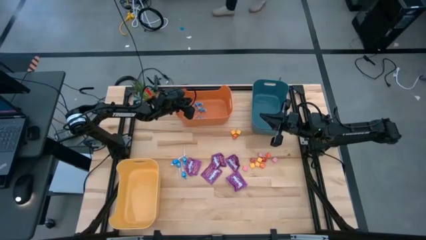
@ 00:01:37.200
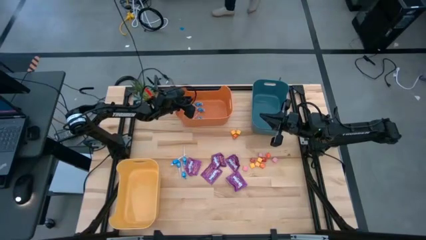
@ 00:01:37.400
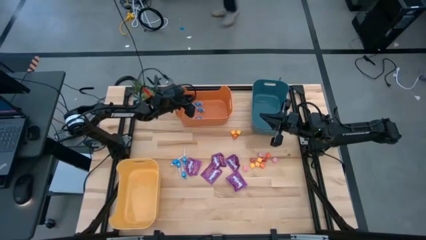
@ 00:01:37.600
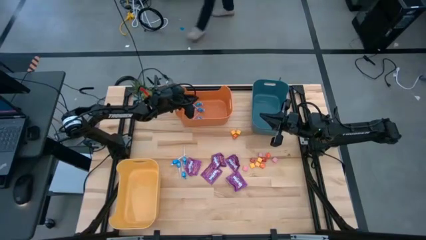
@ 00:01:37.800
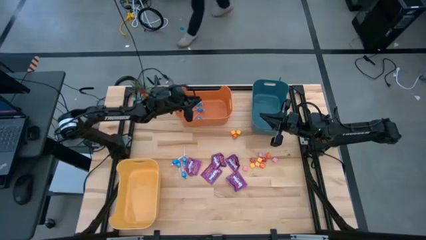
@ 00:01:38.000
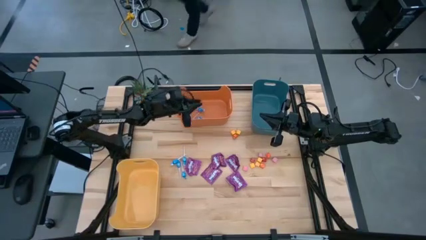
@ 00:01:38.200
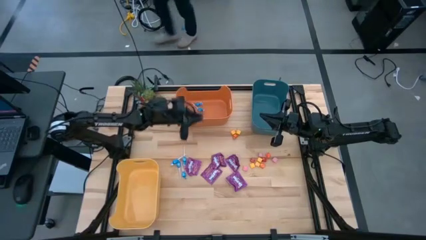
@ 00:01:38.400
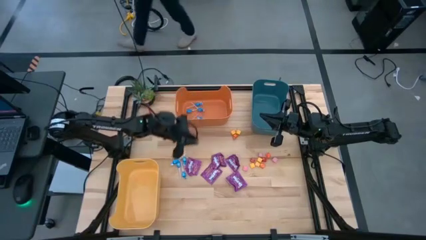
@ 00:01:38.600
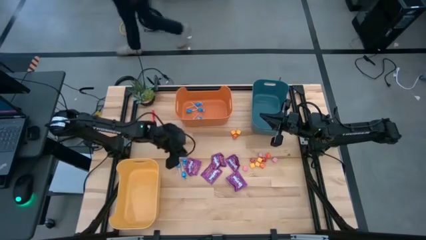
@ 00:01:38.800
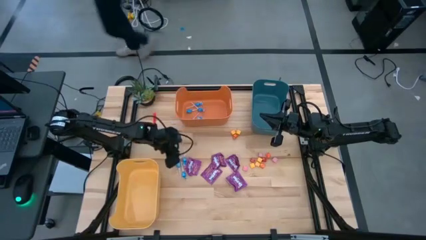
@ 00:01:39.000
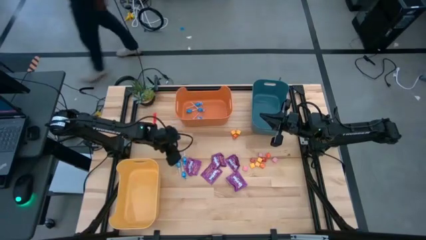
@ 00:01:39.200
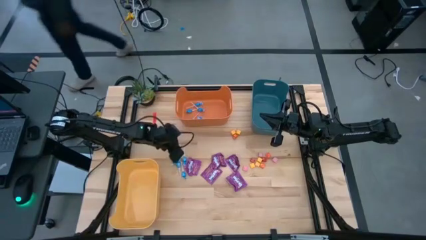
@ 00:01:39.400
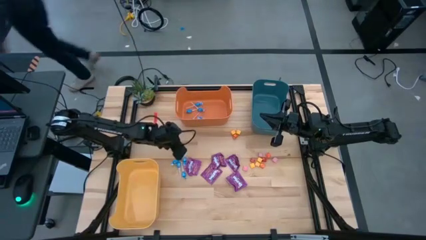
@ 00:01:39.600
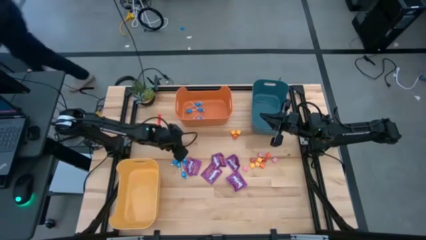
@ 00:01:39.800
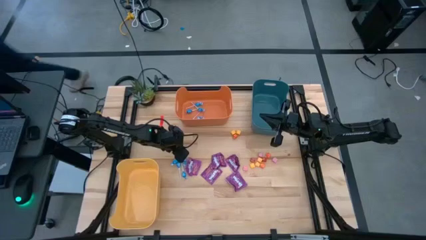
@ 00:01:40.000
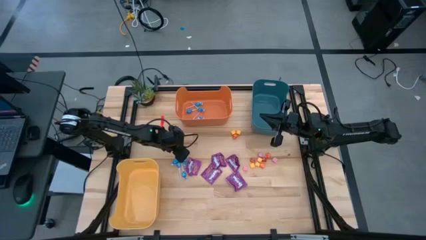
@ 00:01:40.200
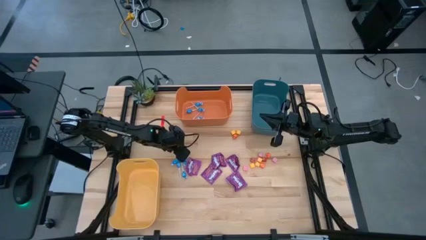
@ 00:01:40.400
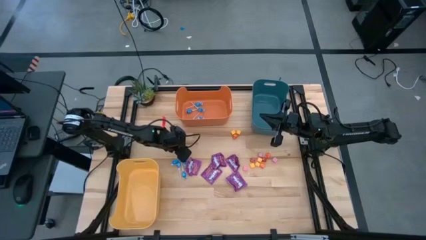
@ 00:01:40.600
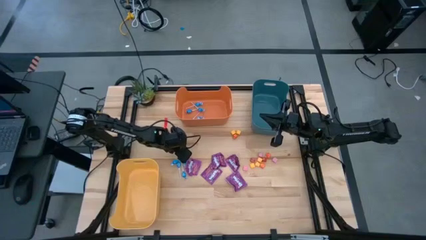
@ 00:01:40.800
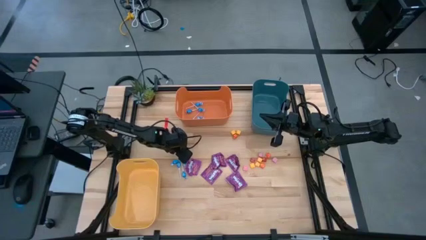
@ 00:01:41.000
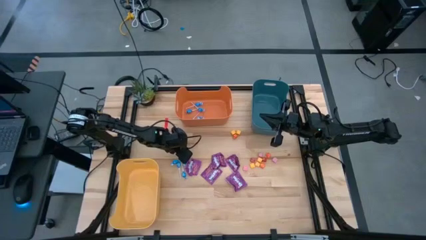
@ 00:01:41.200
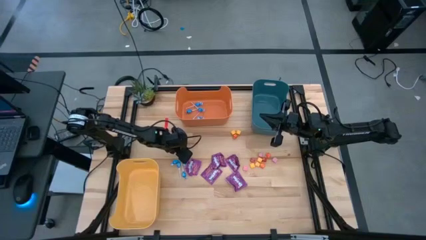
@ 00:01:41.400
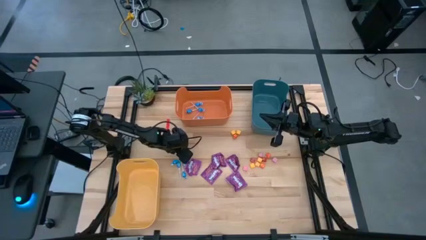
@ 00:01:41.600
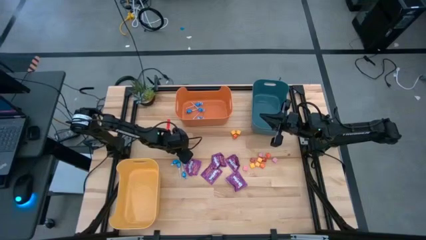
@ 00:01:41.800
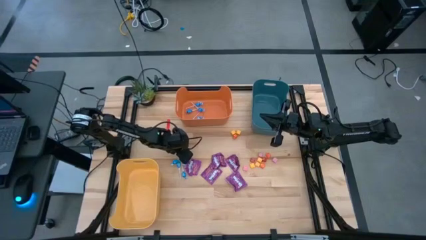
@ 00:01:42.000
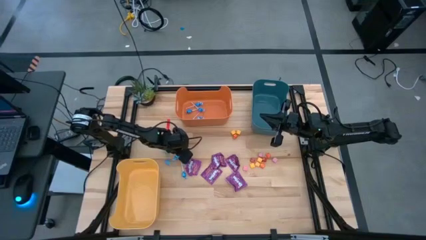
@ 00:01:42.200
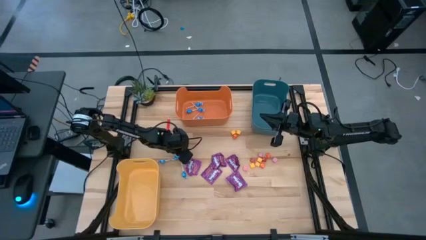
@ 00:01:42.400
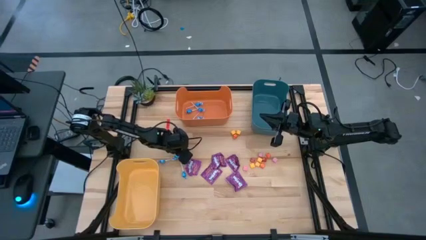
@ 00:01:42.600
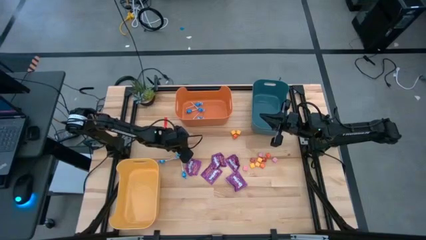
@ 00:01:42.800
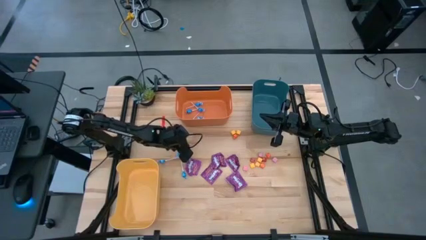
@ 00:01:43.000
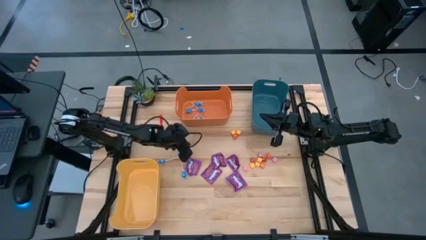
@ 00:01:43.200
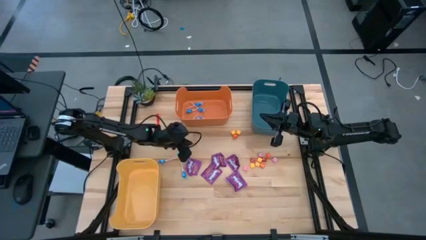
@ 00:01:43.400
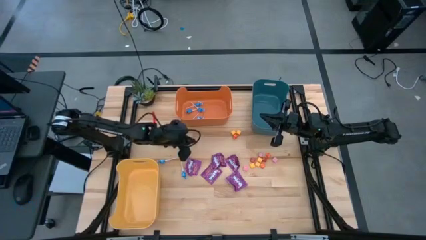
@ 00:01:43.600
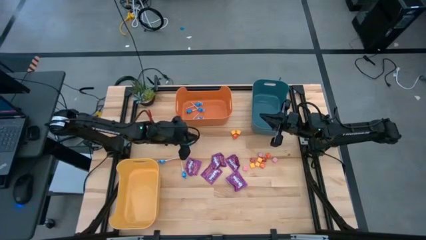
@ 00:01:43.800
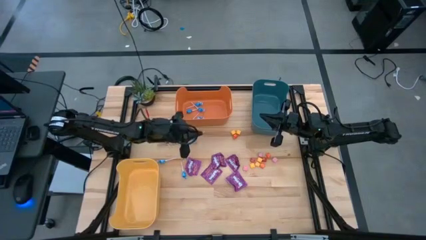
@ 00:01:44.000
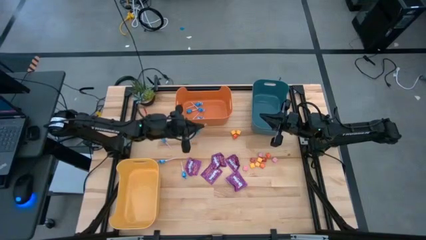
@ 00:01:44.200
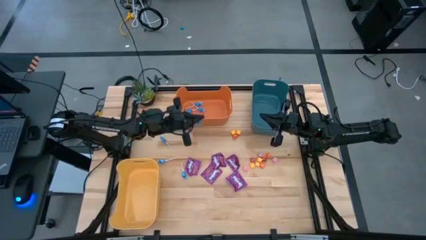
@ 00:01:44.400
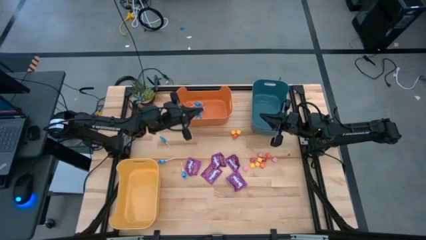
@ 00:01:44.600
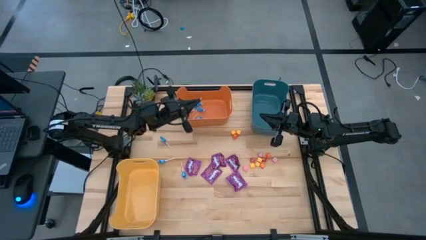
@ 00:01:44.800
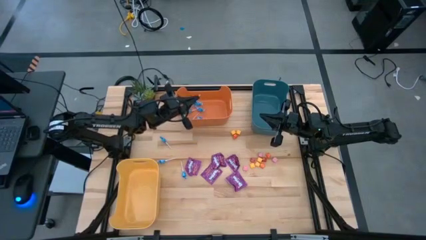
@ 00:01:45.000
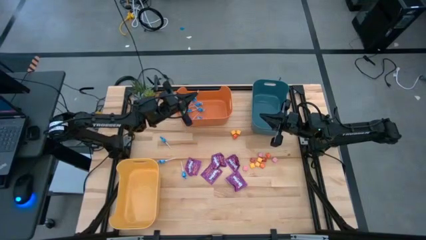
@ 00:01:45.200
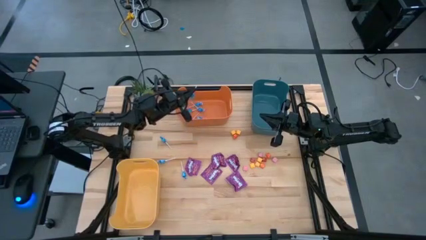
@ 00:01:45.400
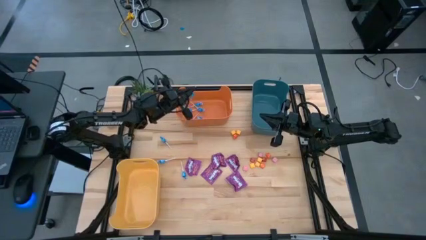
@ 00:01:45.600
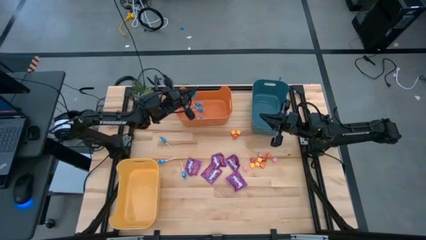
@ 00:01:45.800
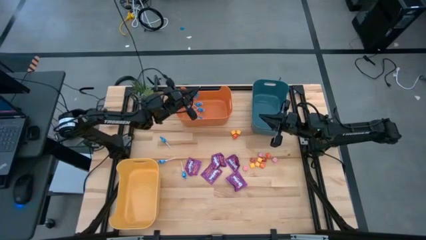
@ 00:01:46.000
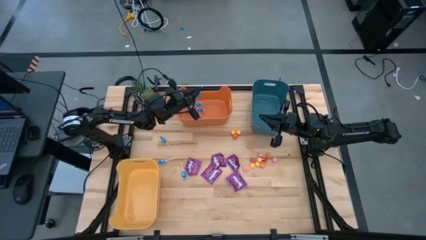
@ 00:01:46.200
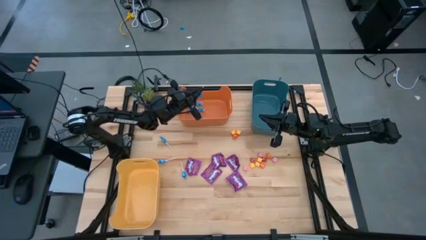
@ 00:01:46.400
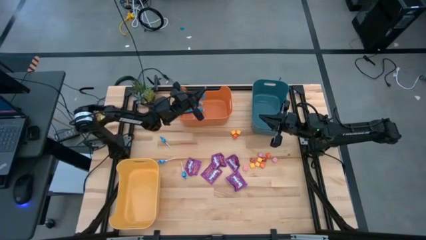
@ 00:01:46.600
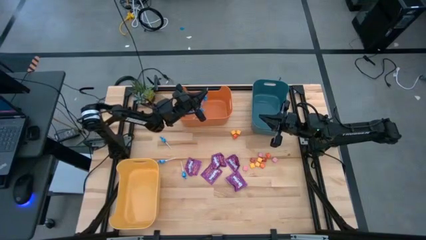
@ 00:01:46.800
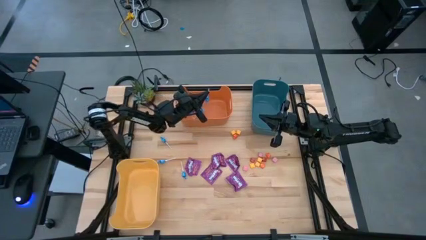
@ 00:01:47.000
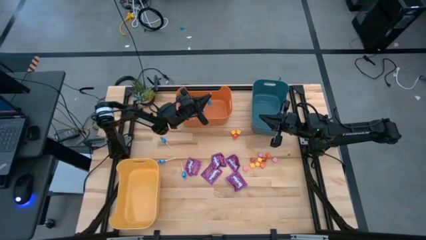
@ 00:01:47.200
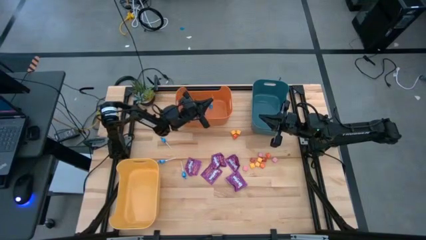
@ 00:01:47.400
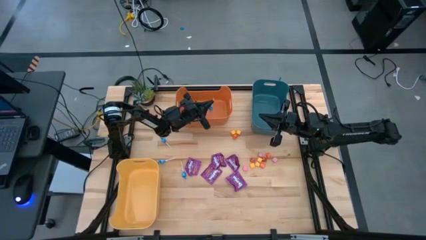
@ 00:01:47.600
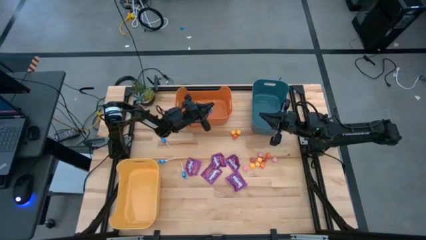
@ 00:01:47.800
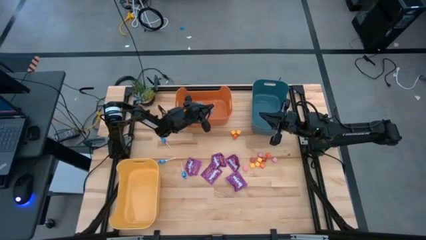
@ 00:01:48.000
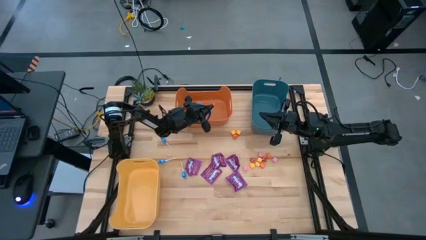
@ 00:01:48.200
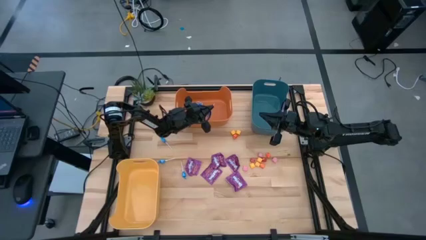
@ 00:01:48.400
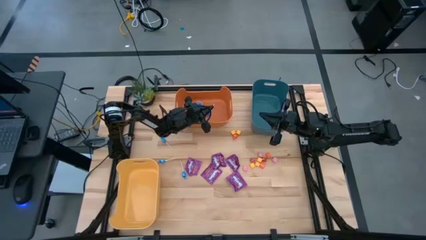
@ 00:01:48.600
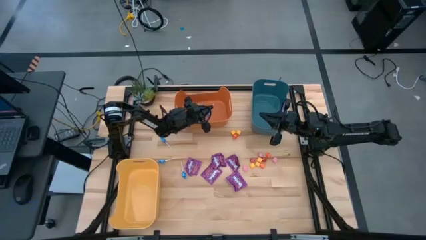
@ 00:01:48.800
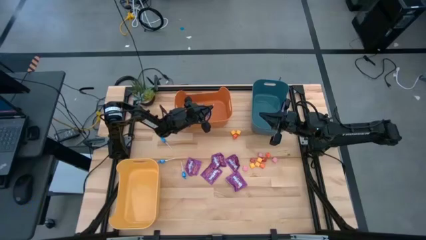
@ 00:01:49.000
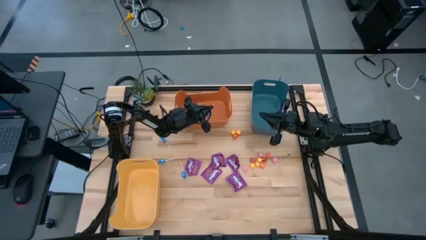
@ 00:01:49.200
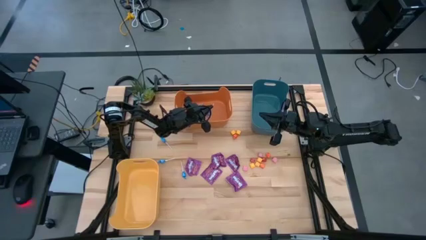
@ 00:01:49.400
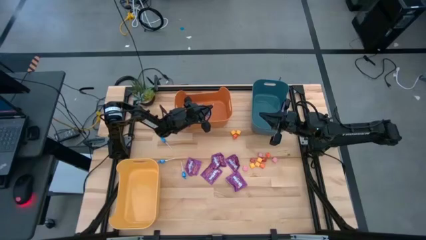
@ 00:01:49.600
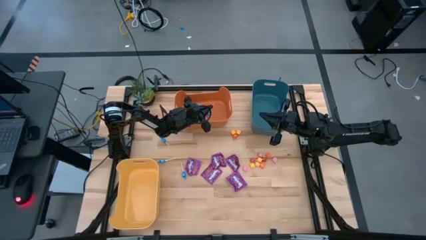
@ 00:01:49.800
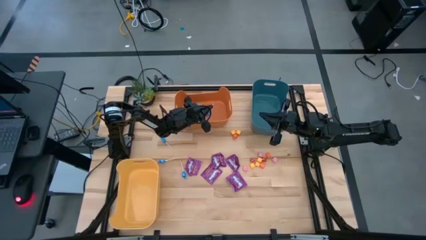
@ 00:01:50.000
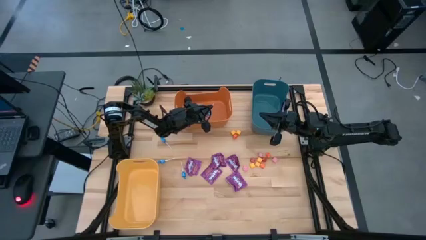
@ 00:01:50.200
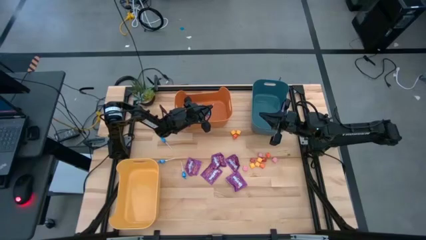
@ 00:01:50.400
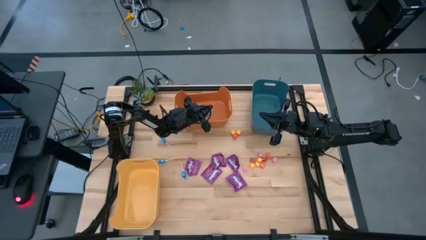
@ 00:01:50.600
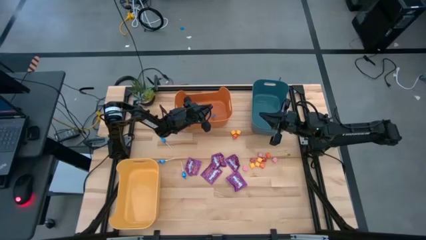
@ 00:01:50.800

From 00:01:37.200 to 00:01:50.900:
Task: Sort candy
Put the blue candy into the orange bin
